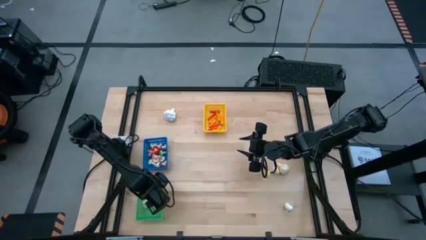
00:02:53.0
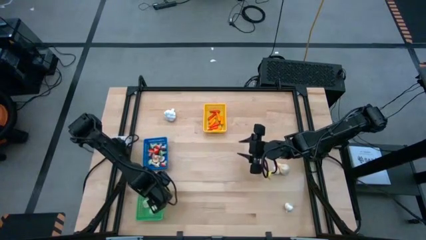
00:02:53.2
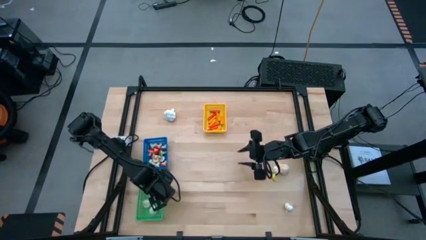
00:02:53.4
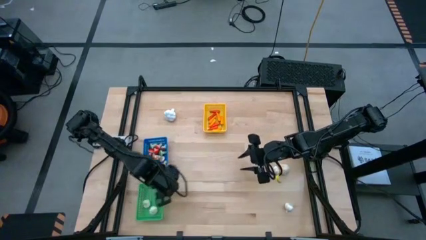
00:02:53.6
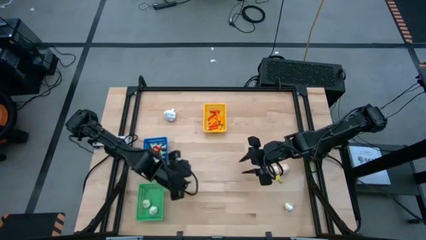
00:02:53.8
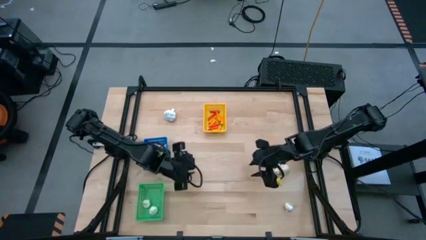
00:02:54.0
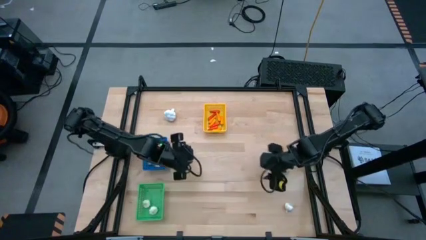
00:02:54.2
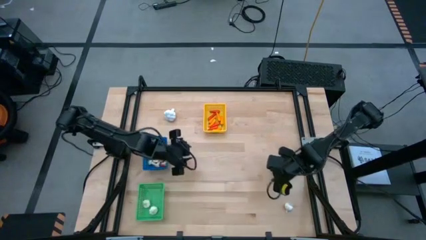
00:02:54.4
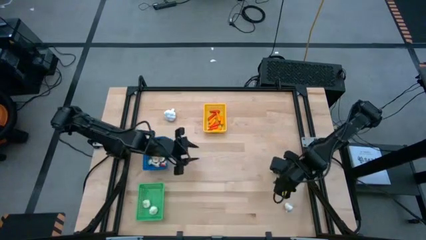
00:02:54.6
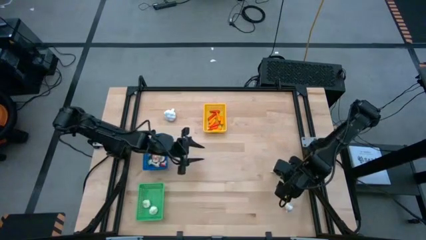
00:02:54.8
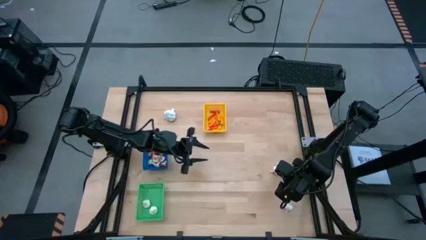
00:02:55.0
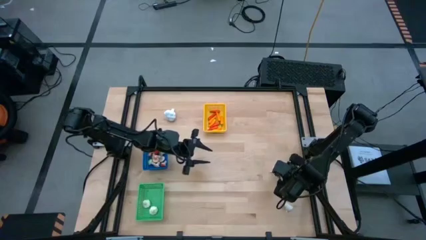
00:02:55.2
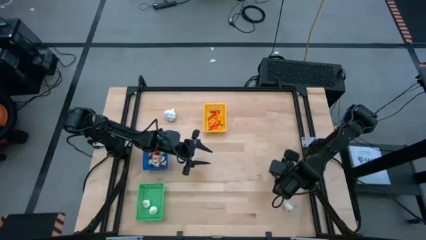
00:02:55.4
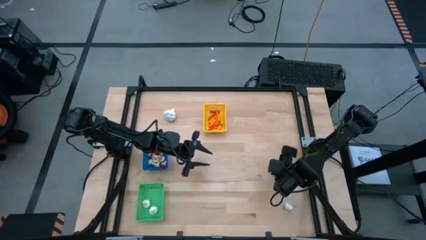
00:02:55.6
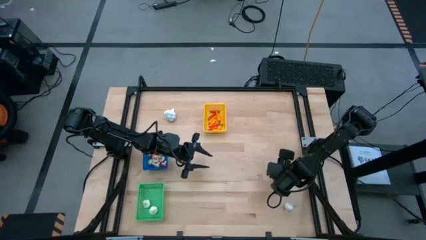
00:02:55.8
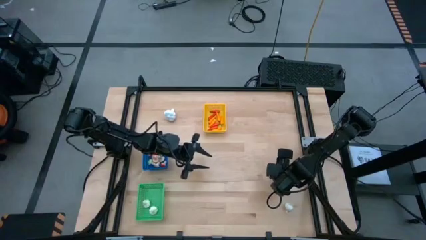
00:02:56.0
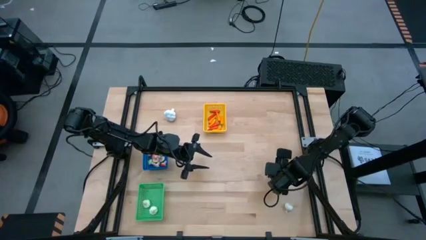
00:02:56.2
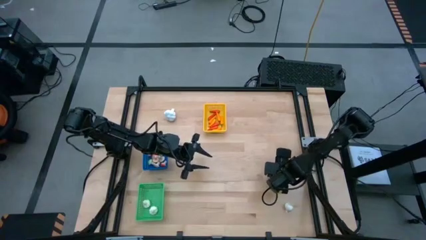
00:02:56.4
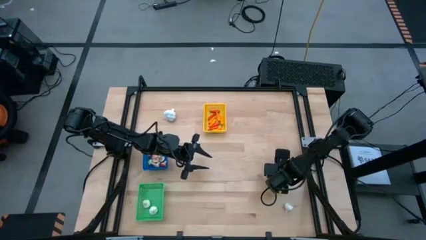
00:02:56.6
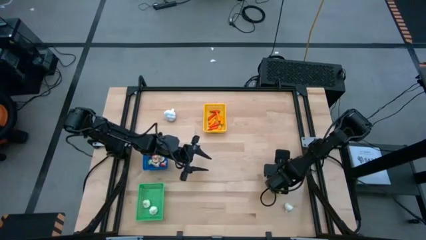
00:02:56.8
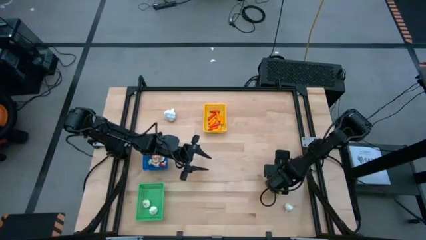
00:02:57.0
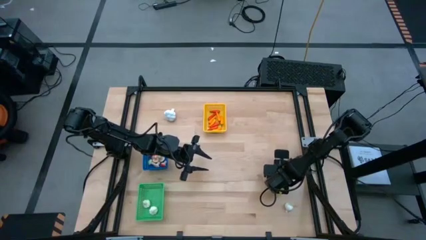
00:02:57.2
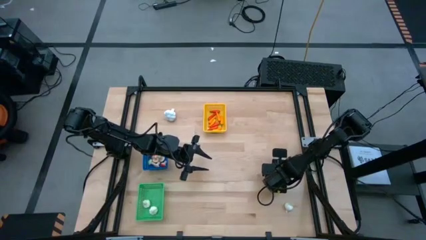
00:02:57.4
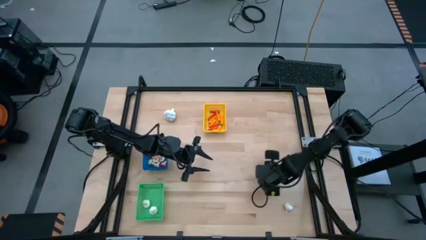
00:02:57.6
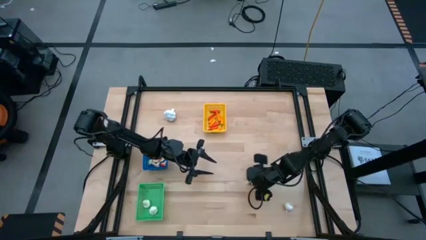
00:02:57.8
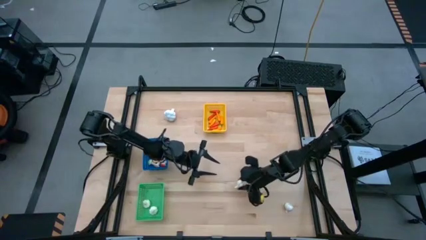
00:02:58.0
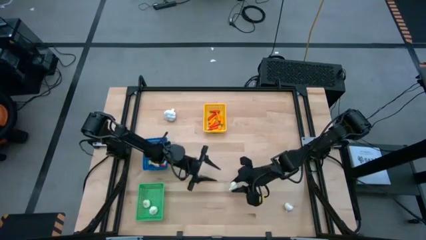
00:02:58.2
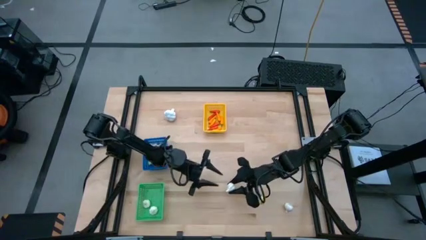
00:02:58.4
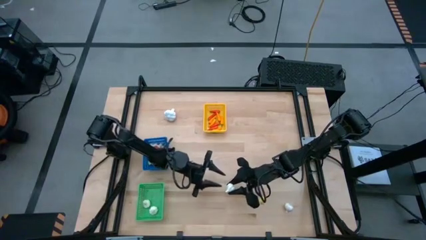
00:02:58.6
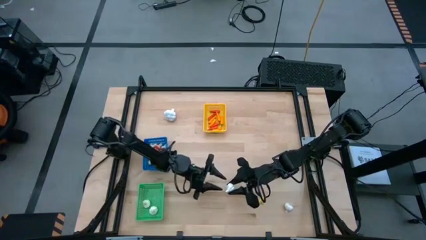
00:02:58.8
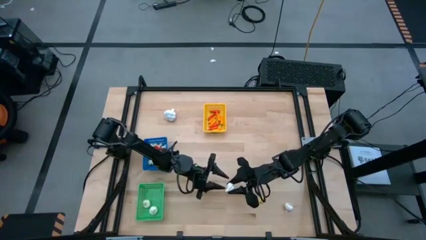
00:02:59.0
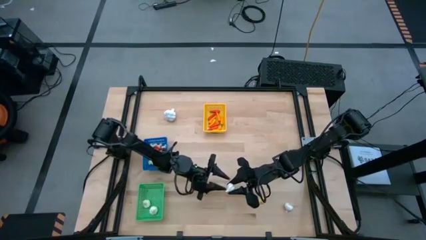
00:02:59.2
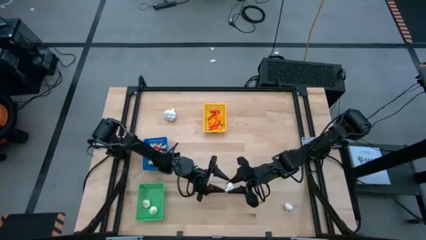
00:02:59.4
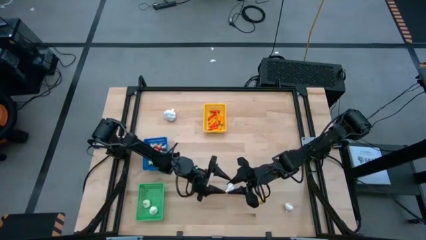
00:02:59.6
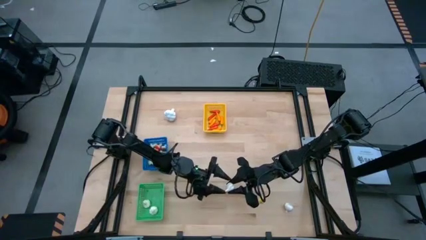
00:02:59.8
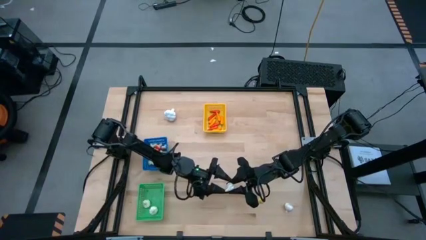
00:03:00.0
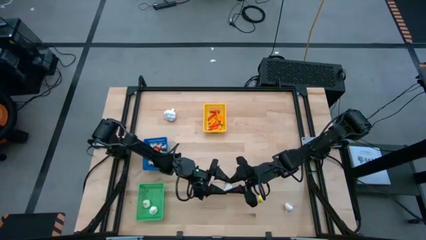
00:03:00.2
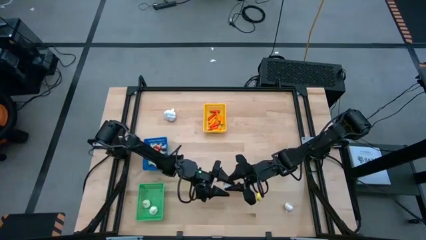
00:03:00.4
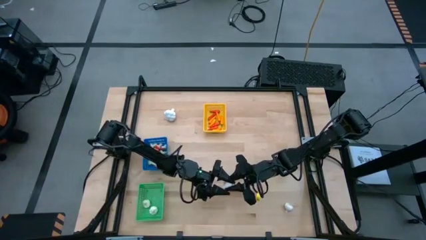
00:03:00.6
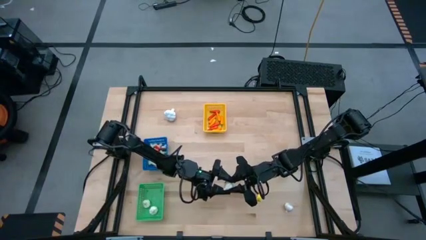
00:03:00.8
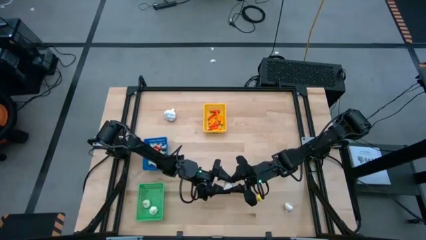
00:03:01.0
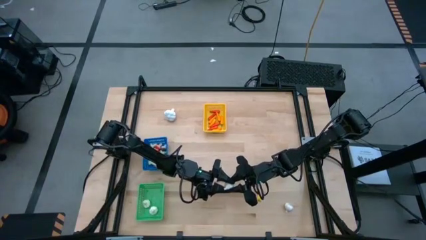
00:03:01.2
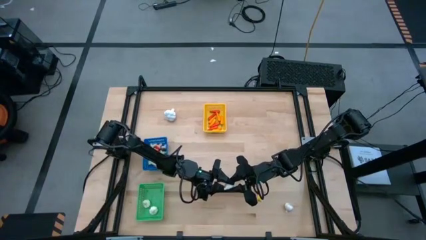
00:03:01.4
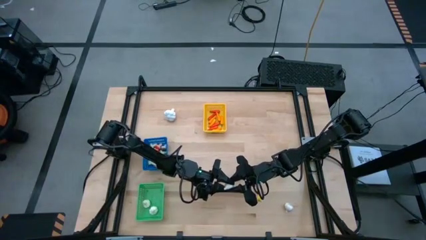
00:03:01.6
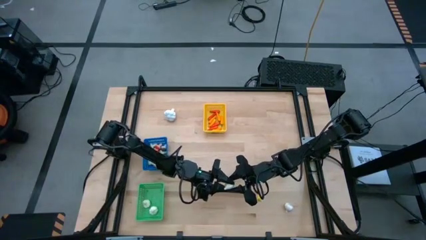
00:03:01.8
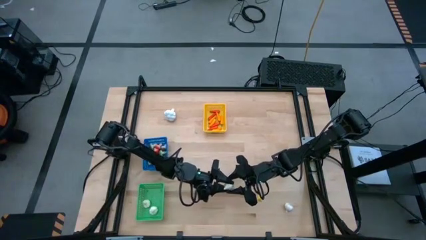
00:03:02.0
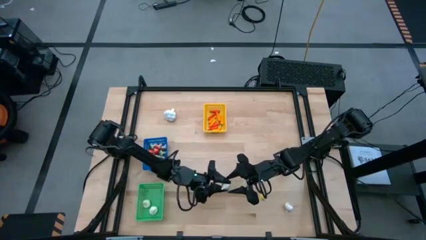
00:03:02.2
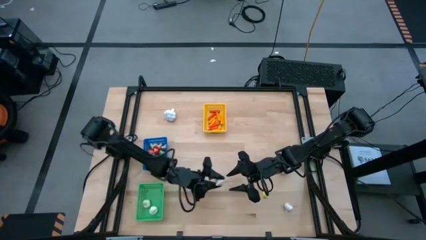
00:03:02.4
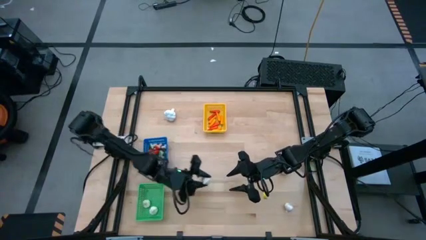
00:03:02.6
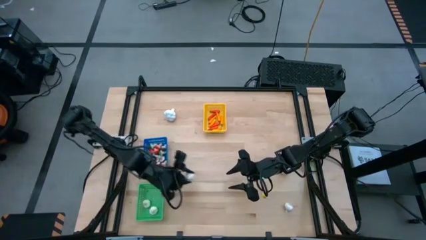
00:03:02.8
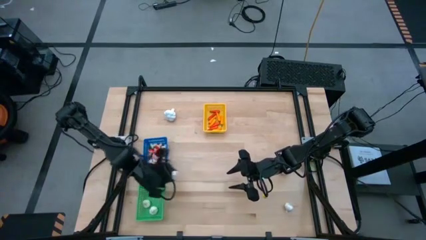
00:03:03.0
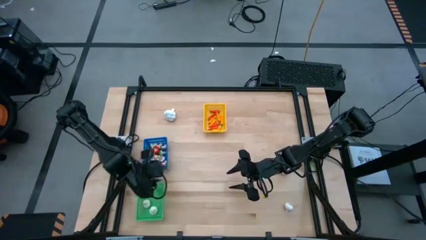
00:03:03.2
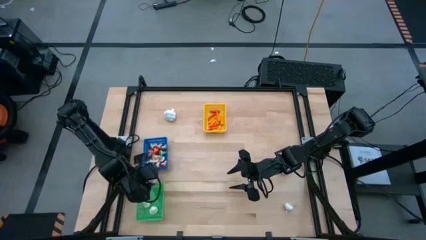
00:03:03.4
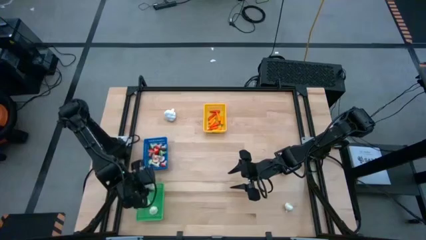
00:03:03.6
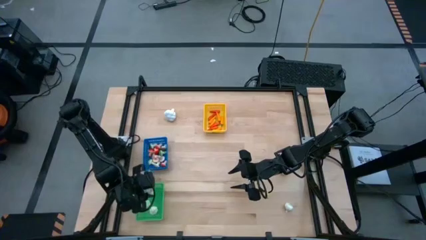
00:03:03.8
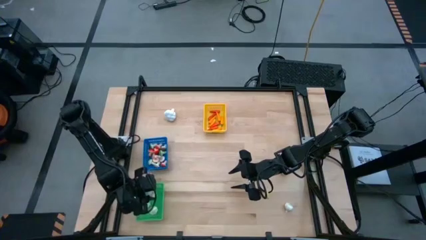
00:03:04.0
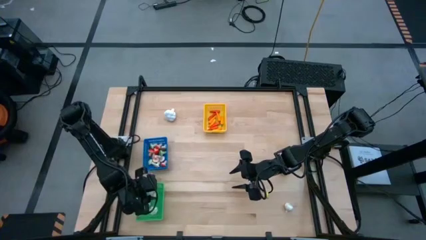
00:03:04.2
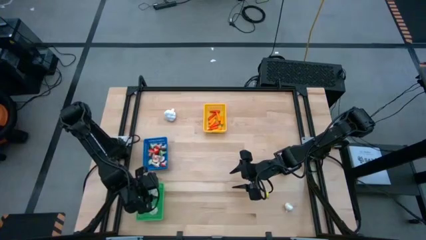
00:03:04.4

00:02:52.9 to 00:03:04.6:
Task: Sort produce into baskets
Put the garlic into the green bin

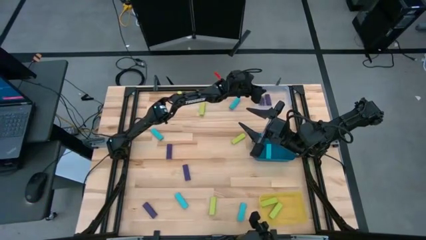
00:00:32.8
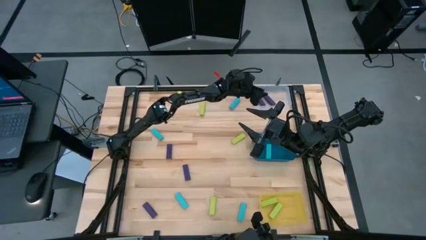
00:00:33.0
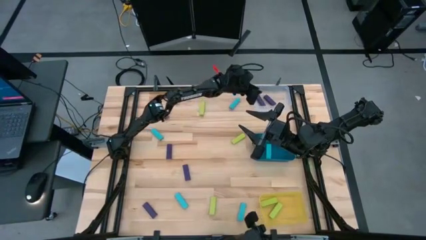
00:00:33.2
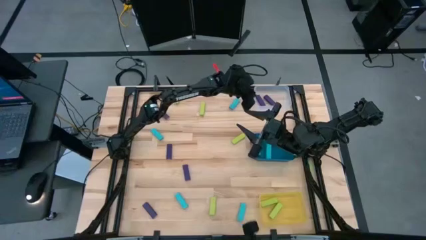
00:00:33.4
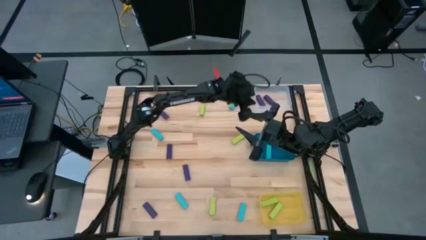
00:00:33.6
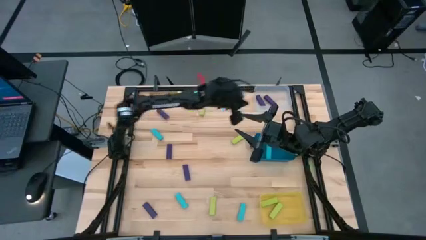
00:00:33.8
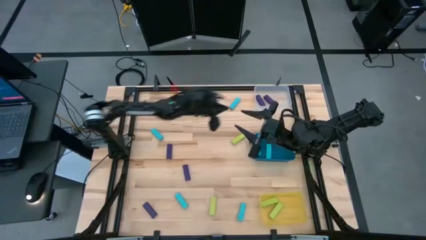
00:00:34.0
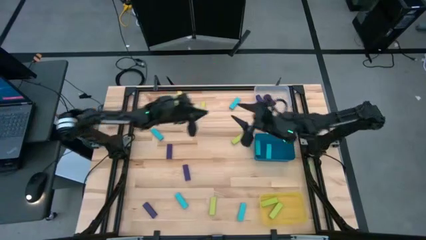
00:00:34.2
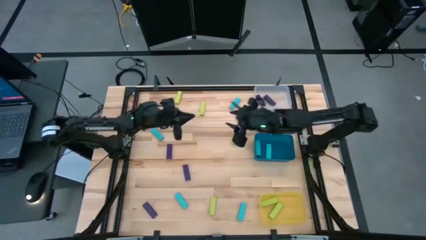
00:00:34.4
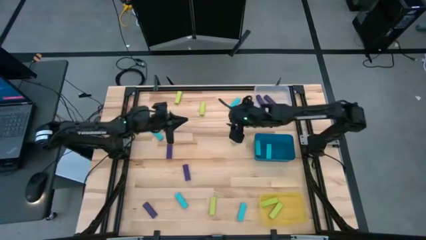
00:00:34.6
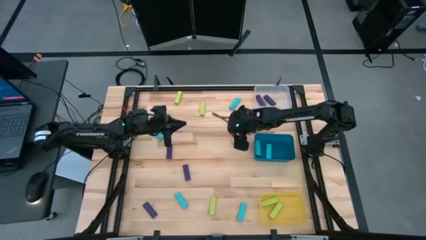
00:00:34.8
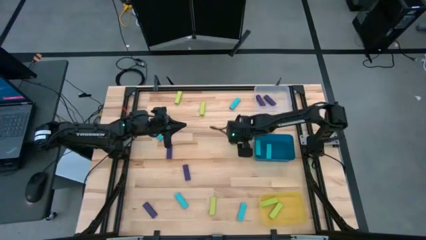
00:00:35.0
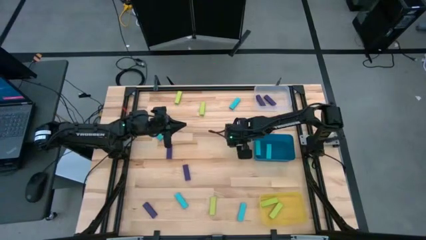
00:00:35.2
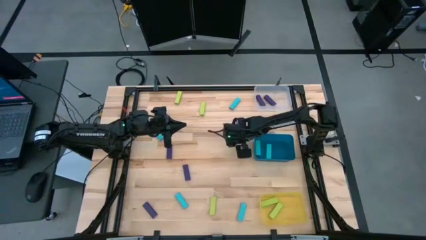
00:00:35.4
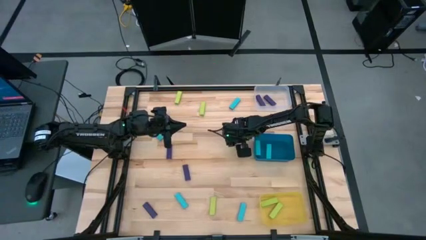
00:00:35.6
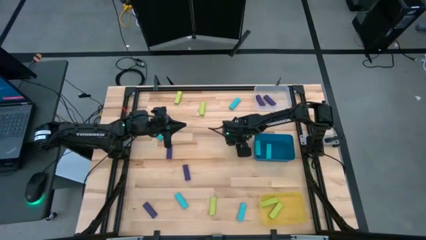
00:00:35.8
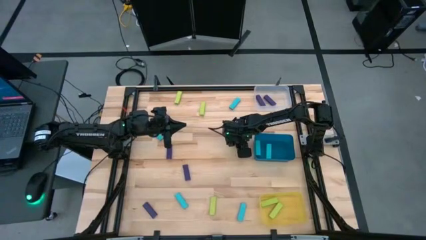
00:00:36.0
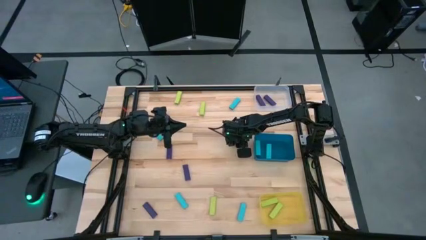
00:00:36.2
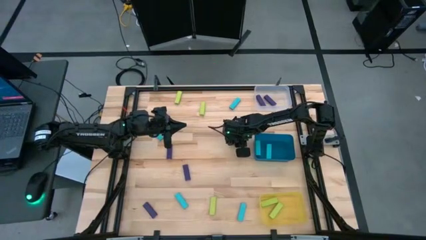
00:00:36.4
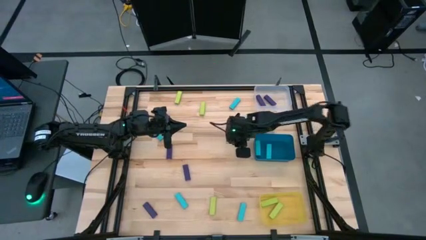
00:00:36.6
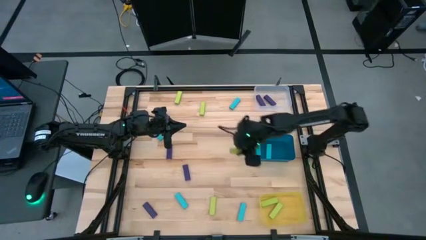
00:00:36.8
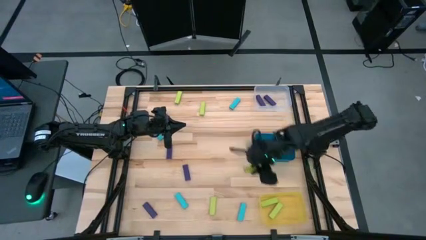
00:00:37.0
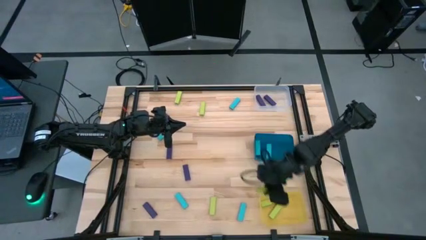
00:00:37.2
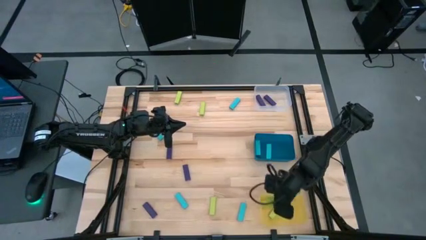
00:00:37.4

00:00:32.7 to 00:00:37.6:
Task: Sort blocks
Put the light green block into the yellow bin

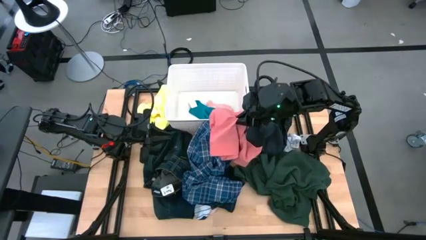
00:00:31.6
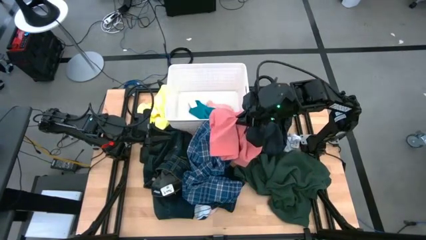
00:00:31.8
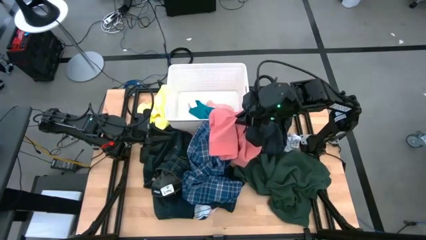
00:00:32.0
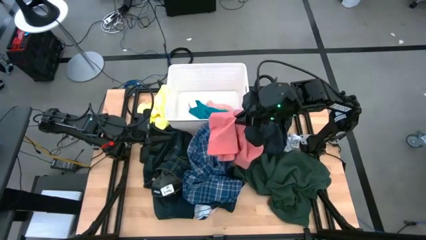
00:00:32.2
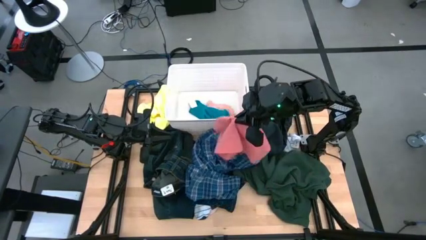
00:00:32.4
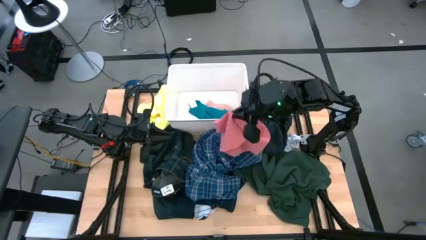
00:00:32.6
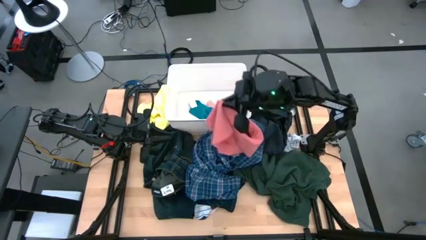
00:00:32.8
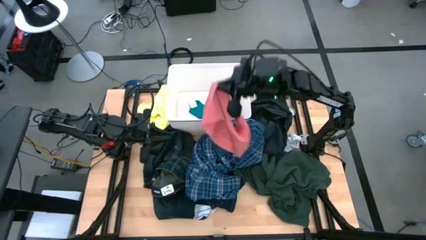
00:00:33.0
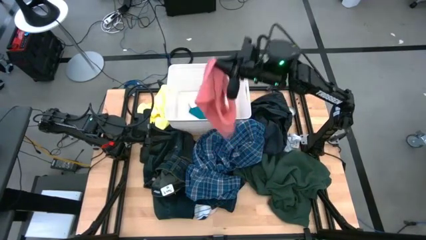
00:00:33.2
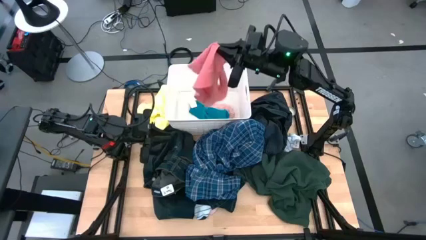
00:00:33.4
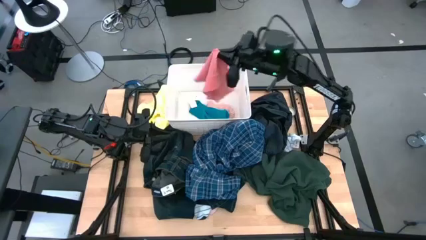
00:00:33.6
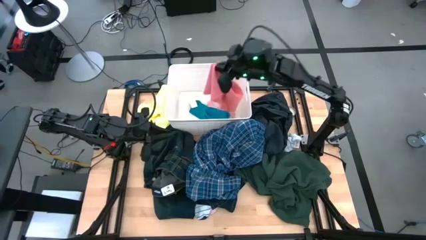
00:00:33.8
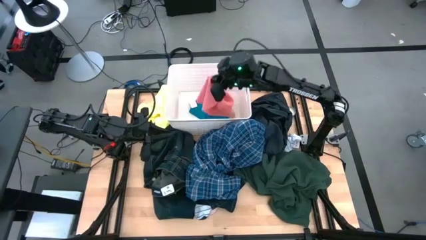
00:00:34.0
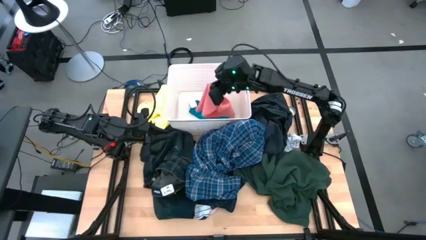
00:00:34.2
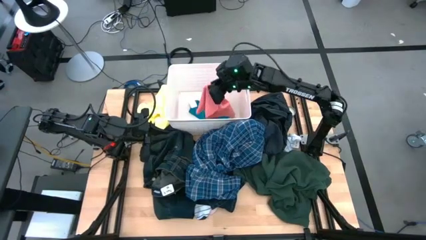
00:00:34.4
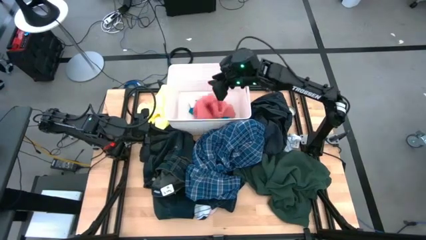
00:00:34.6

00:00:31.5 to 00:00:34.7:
Task: Sort clothes
Put the pink shirt into the laundry organizer
